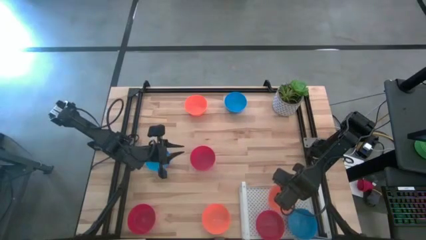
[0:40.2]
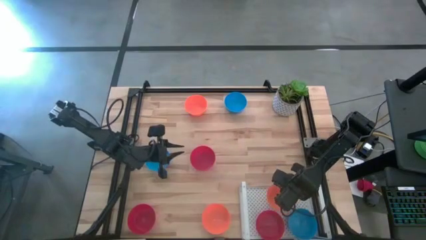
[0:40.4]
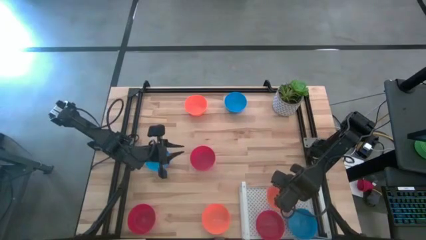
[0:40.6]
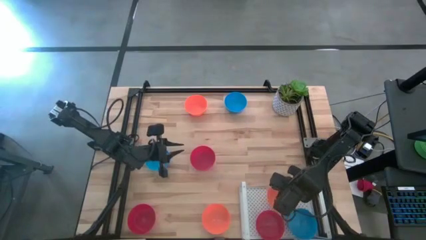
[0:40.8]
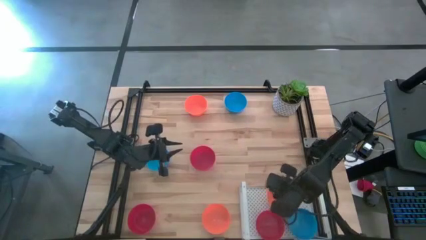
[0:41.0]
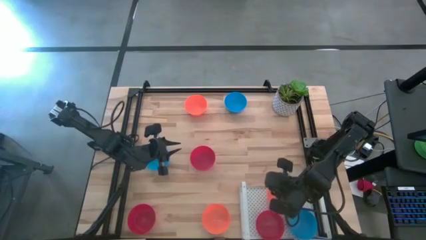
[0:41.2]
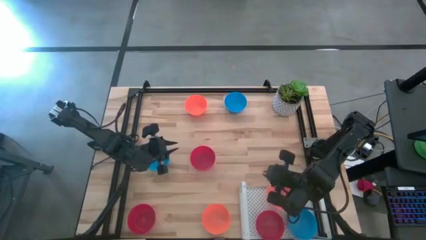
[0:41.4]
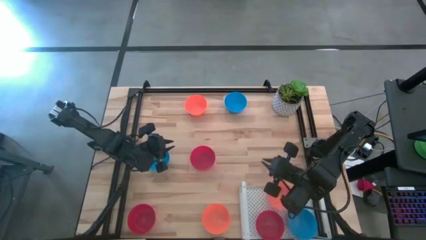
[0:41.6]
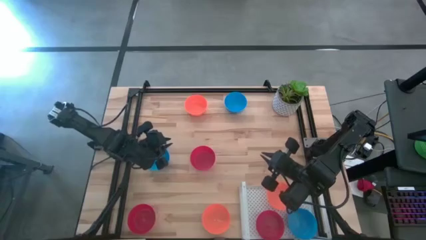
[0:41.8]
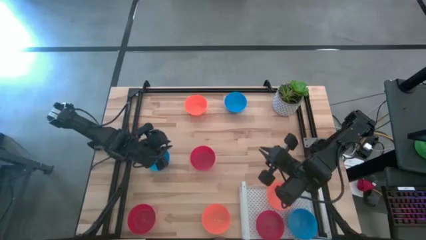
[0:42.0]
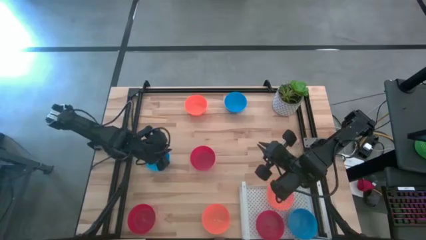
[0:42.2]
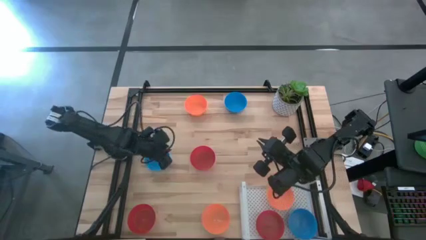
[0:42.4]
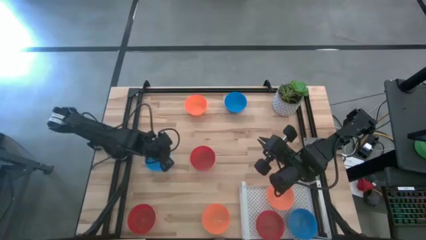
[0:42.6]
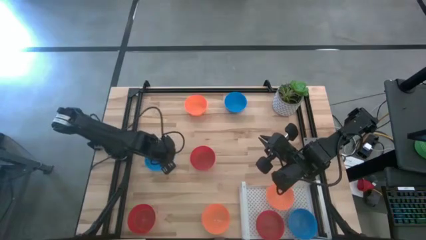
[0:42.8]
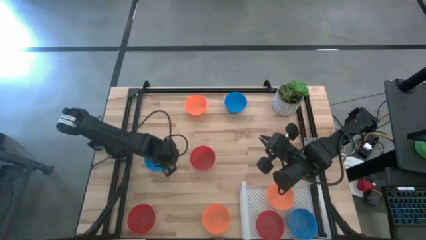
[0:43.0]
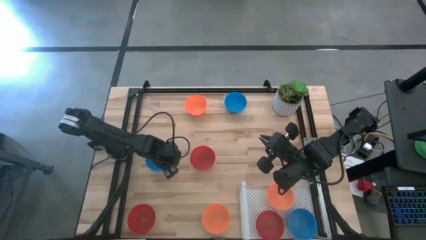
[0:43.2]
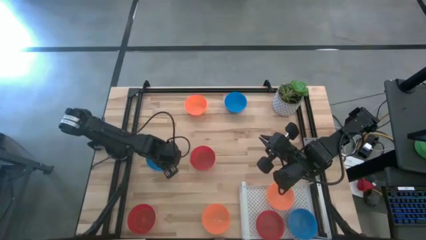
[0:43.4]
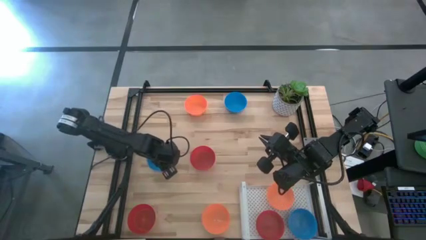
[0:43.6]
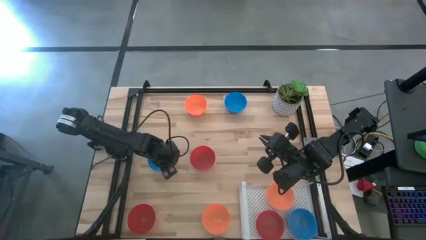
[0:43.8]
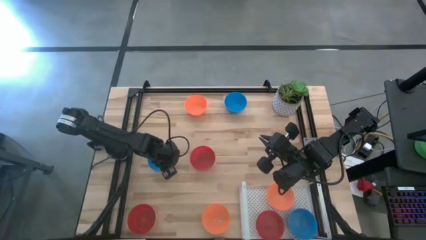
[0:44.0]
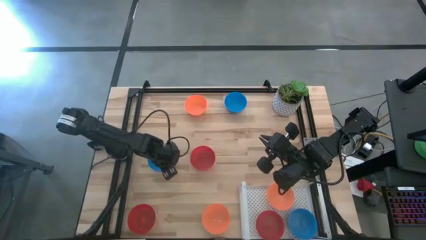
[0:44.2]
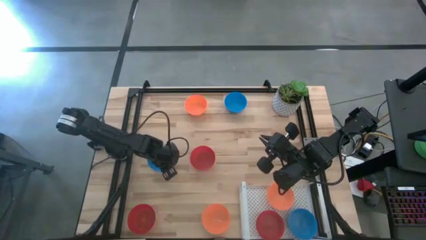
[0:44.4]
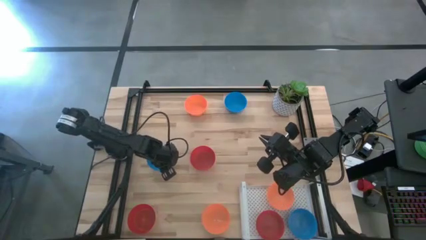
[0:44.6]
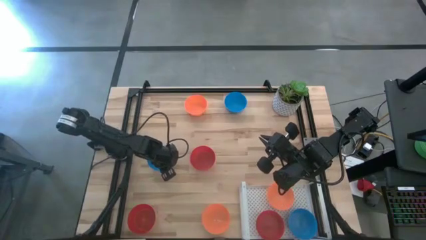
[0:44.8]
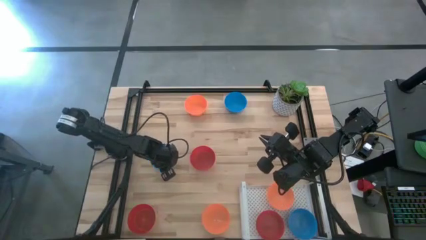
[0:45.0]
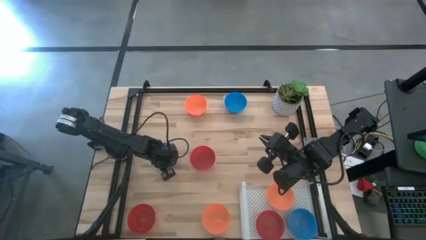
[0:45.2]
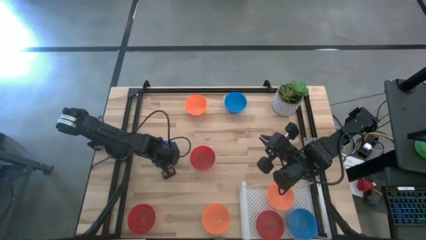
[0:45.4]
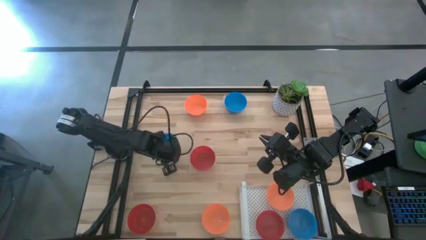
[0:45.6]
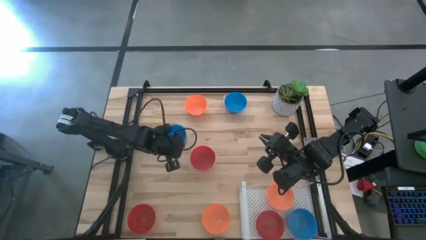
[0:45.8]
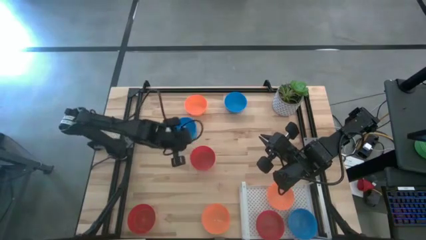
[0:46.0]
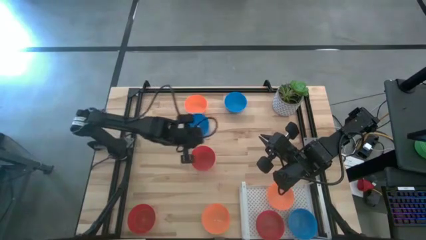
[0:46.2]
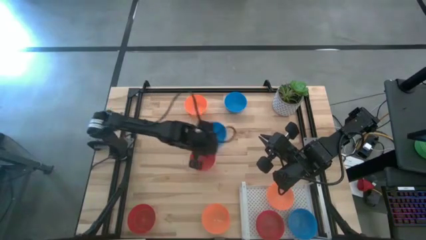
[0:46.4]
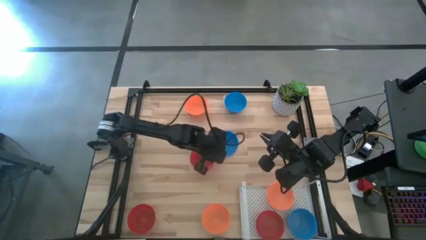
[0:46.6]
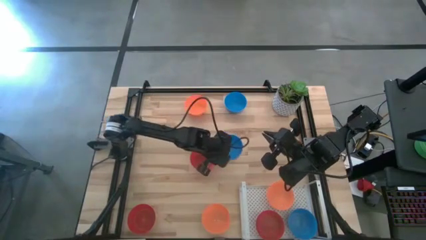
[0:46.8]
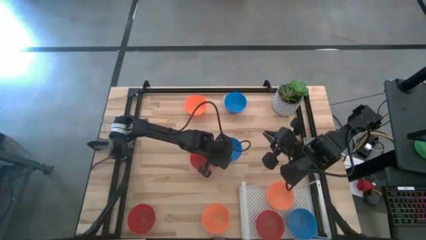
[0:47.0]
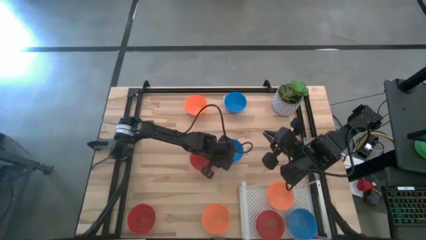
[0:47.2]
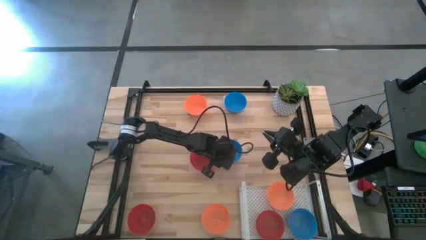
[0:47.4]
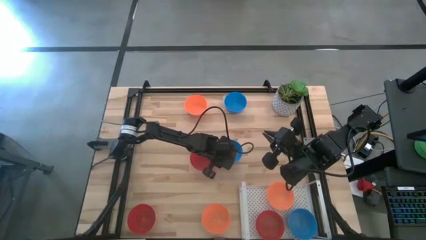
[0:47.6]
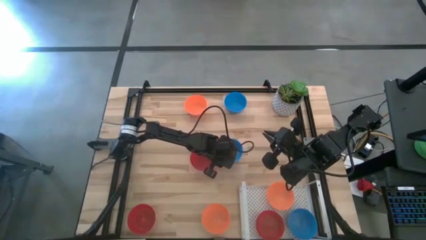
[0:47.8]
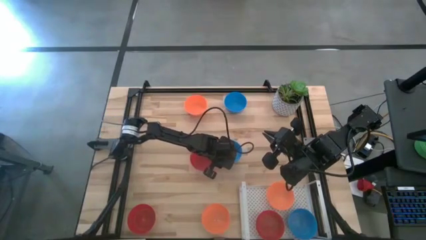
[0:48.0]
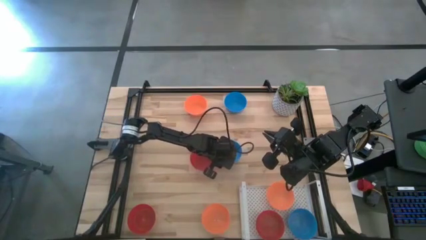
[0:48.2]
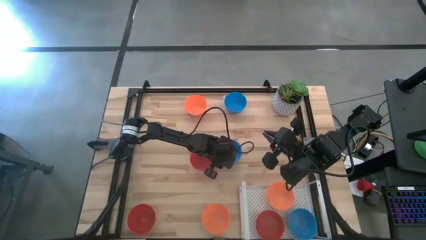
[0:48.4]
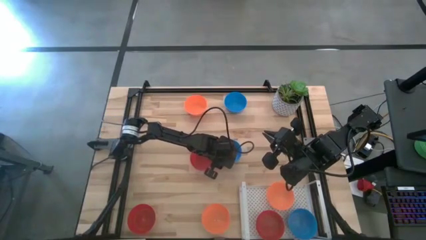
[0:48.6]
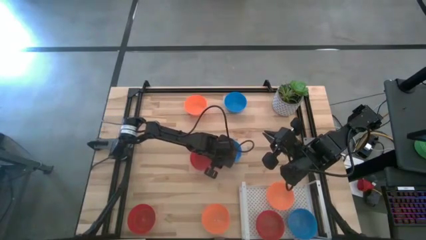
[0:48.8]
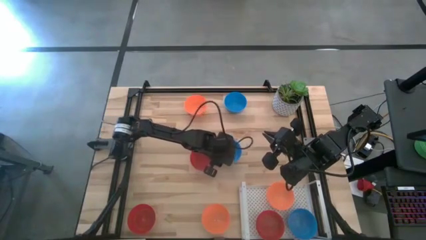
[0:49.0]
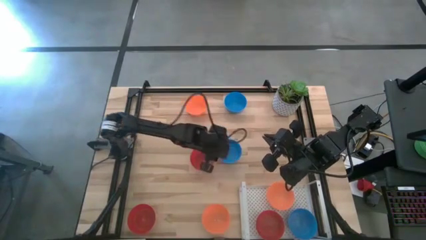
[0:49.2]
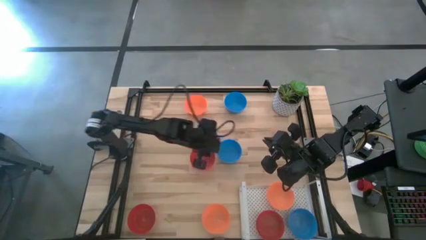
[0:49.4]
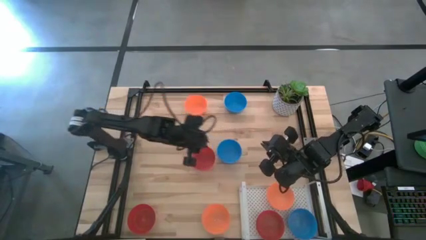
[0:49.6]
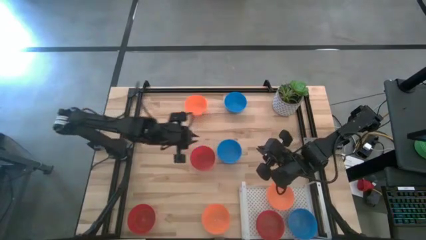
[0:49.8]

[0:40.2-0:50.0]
Task: Pick & Place Mini bowls
Stack the bottom blue bowl on top of the blue bowl on the shelf

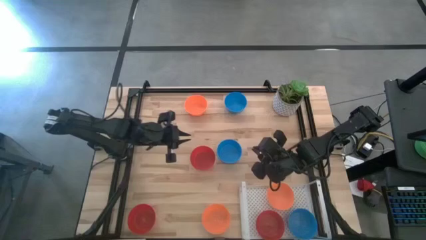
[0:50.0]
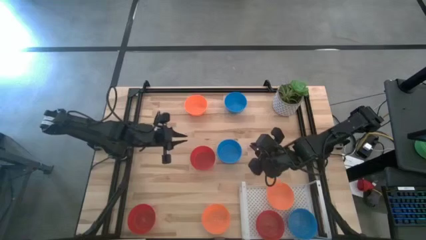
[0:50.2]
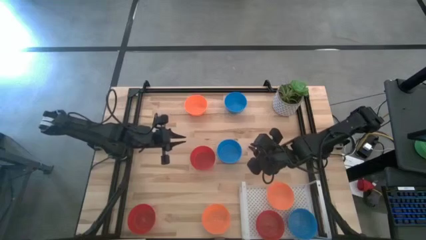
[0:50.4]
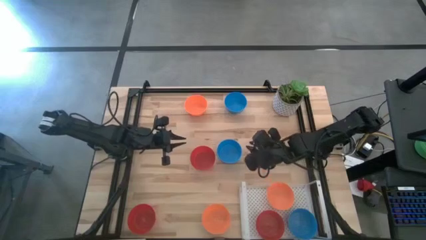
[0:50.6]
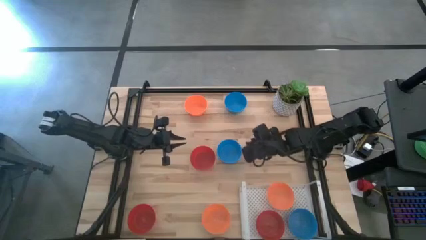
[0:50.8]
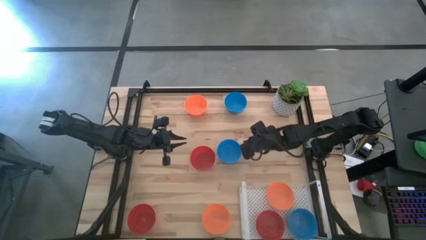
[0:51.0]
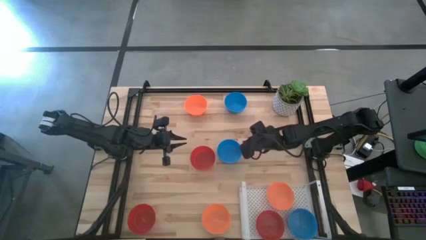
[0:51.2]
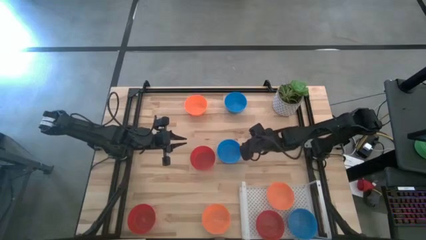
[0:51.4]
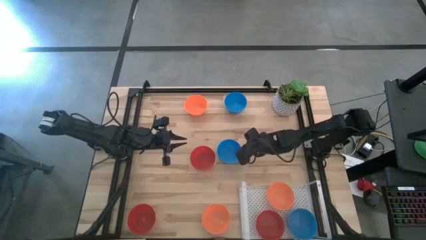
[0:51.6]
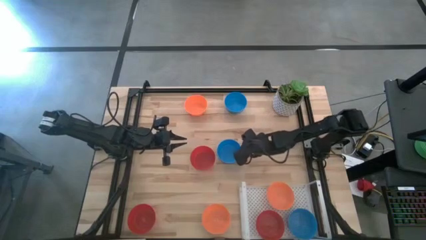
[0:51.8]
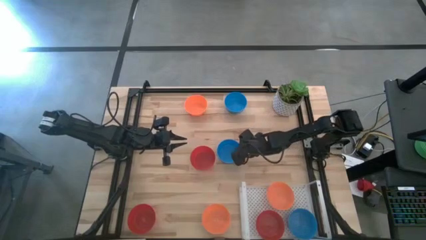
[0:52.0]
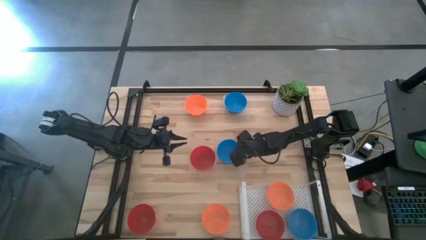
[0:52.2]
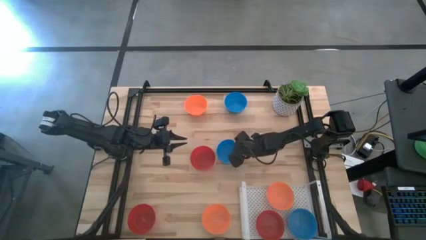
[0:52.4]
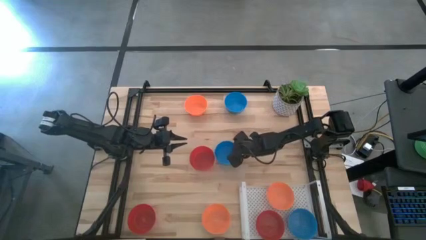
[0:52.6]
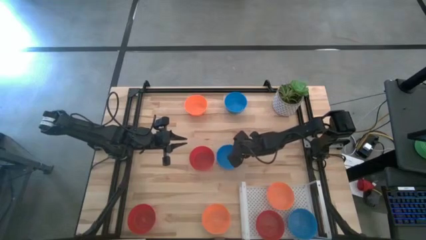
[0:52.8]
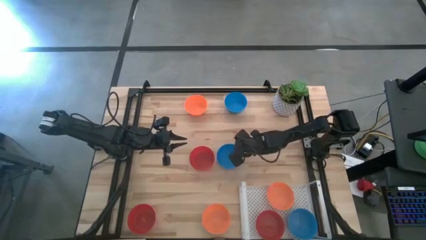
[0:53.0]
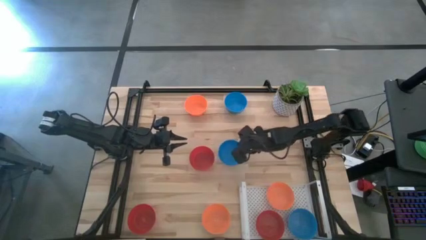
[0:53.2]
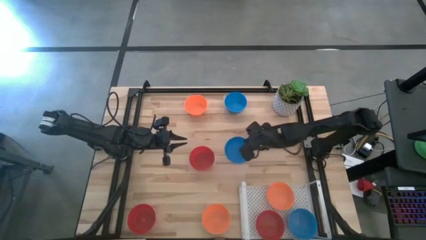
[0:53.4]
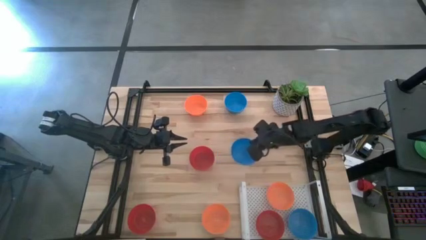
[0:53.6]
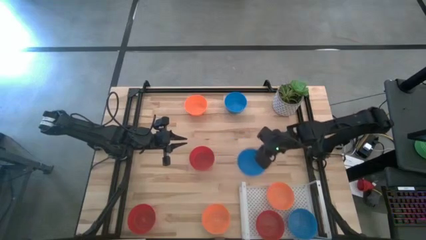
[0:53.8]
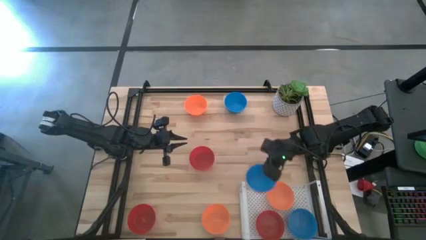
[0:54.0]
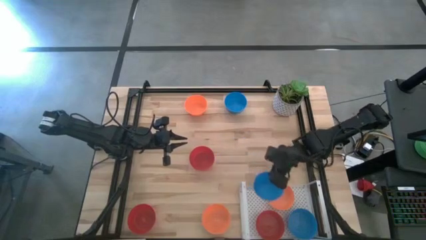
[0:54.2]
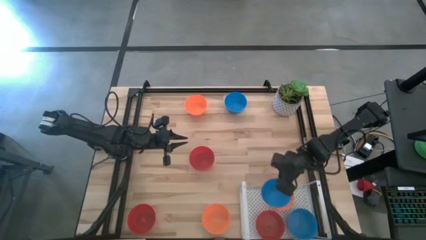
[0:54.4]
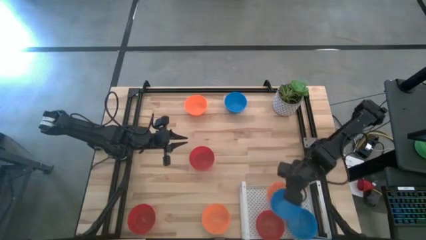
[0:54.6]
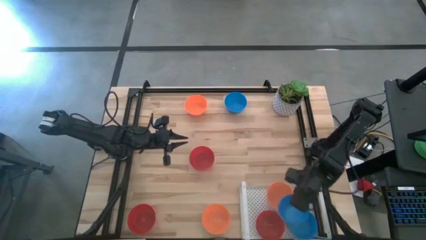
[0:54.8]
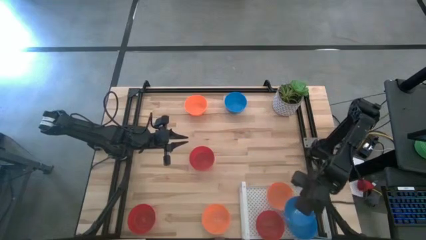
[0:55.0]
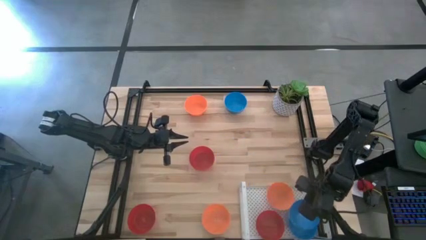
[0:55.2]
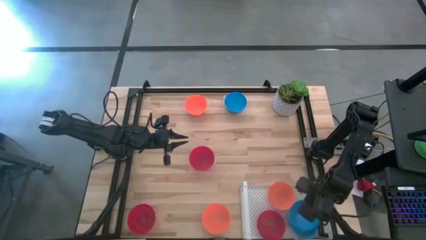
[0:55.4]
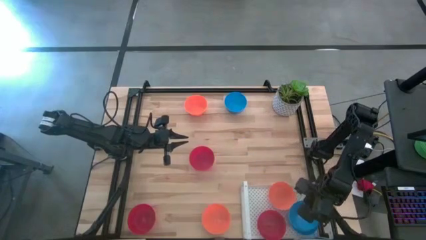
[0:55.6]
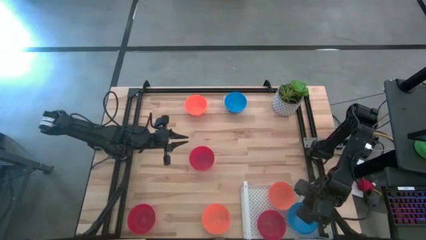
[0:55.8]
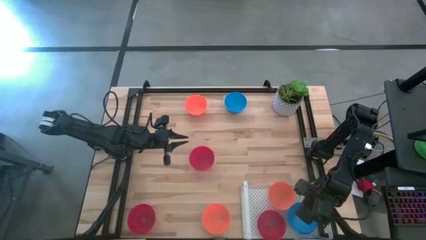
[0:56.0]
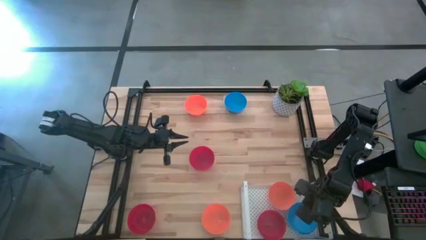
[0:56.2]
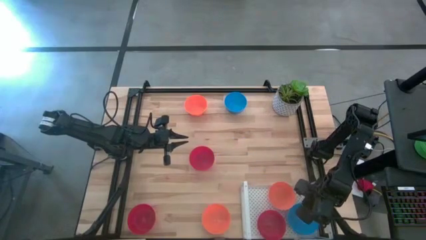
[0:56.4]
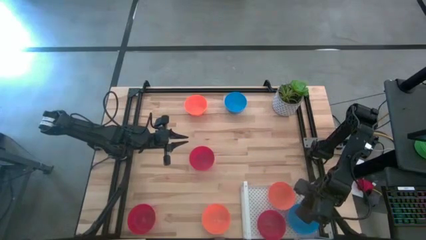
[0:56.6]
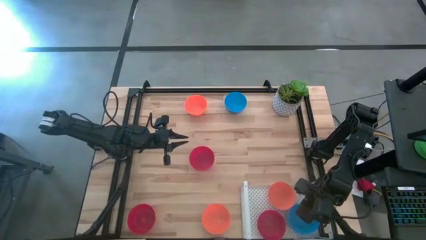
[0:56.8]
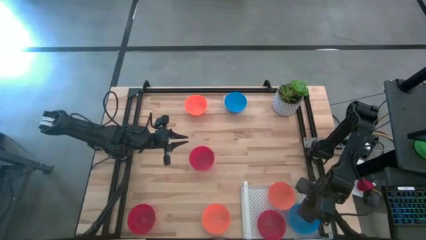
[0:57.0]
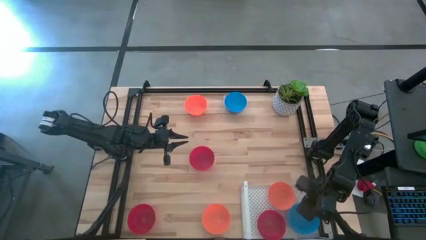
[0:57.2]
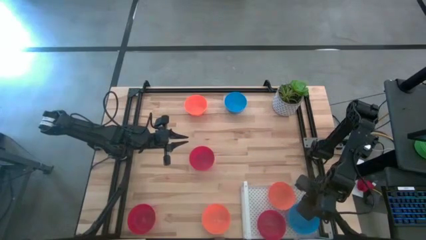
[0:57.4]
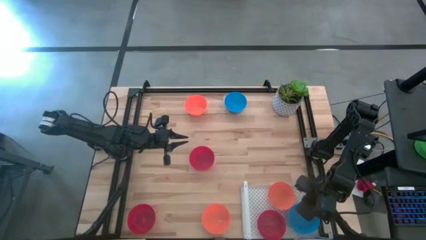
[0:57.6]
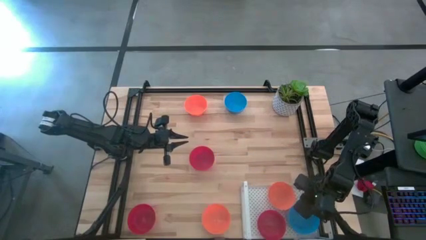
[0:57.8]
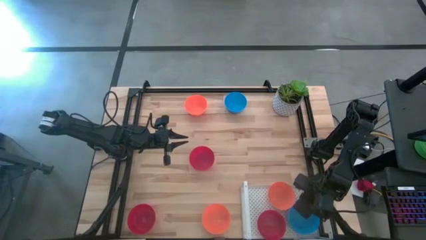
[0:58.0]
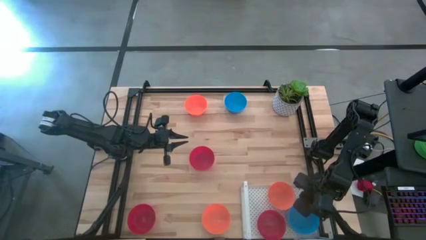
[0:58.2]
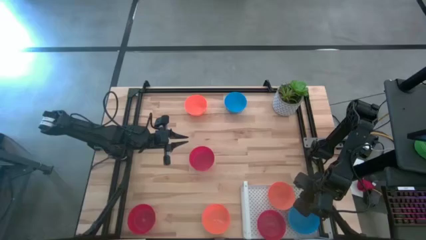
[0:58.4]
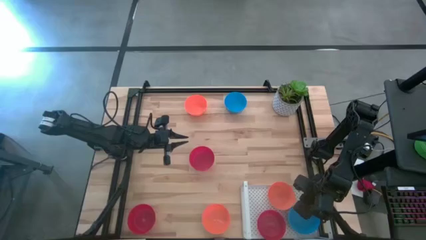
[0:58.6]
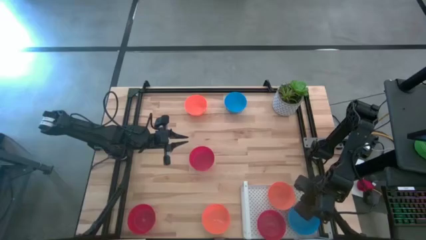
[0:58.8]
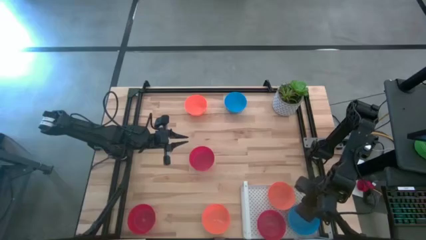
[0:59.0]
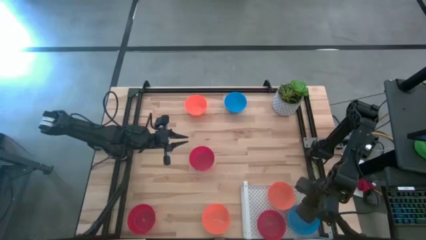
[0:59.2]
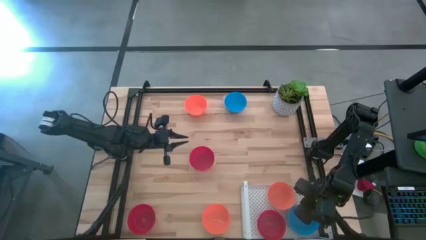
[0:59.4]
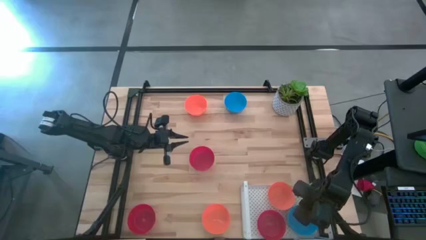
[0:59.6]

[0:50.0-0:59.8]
Stack the bottom blue bowl on top of the blue bowl on the shelf
